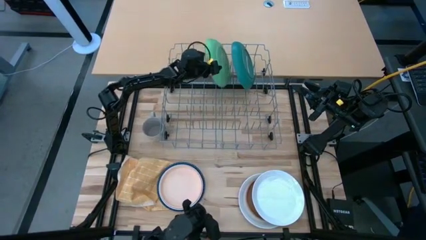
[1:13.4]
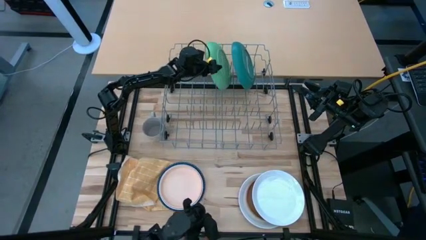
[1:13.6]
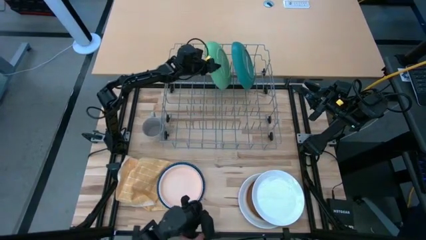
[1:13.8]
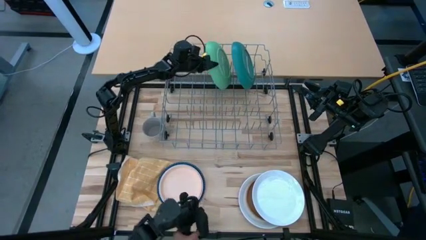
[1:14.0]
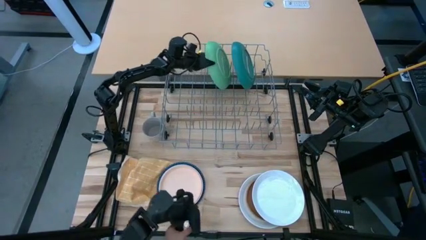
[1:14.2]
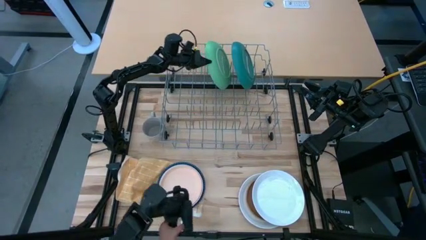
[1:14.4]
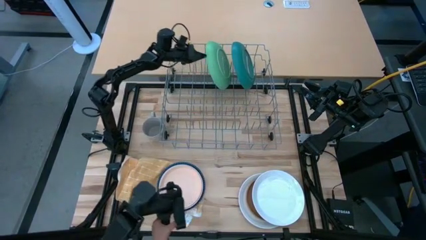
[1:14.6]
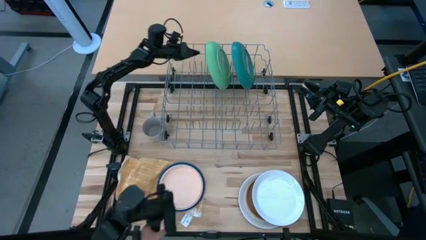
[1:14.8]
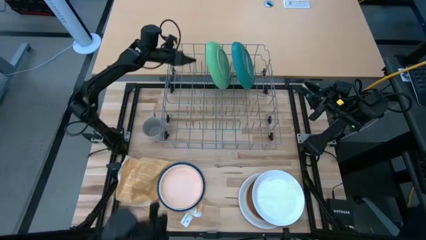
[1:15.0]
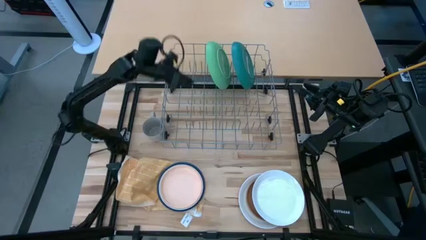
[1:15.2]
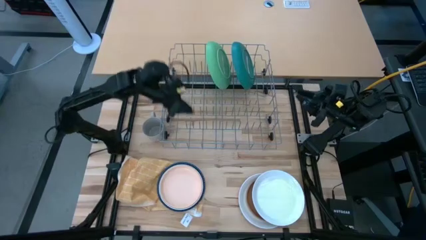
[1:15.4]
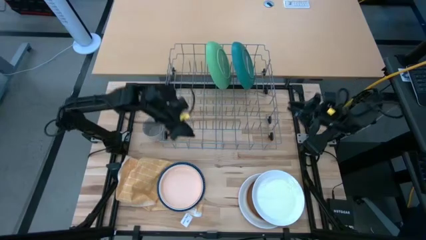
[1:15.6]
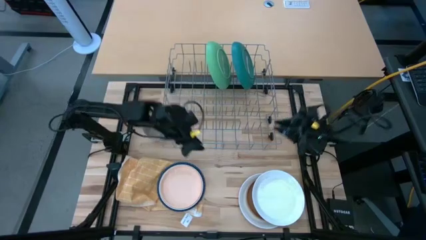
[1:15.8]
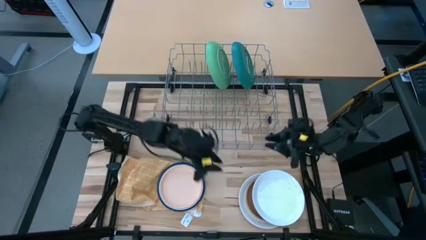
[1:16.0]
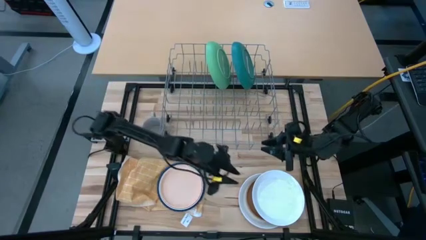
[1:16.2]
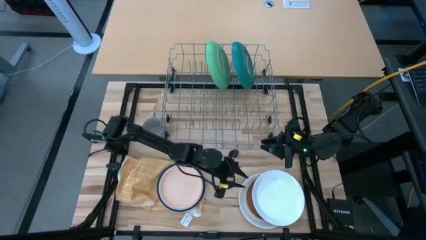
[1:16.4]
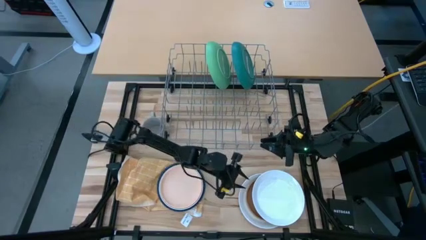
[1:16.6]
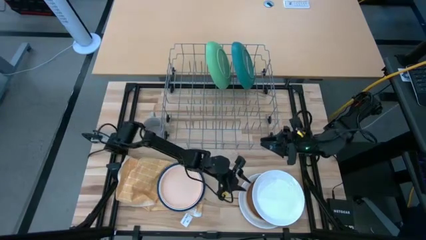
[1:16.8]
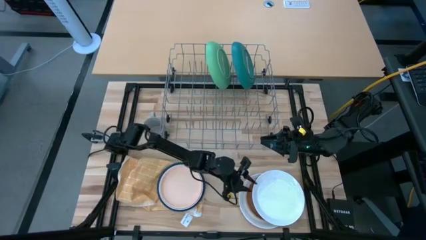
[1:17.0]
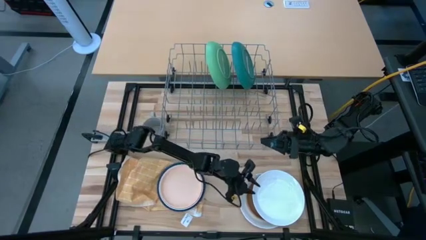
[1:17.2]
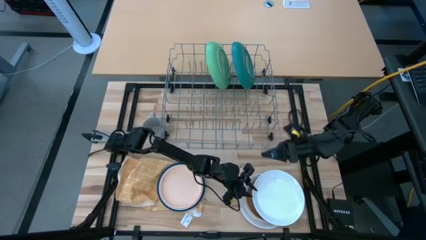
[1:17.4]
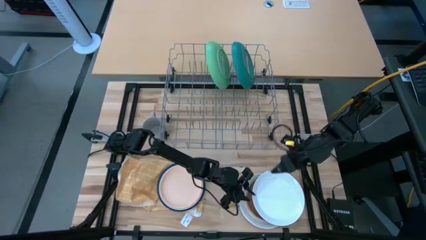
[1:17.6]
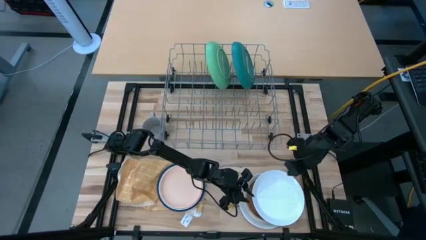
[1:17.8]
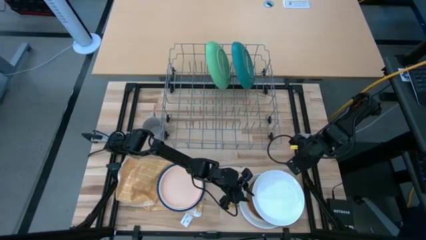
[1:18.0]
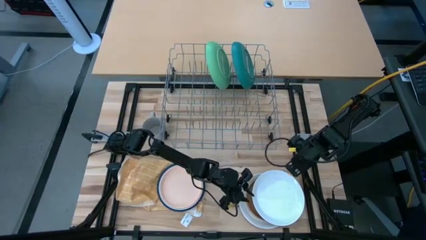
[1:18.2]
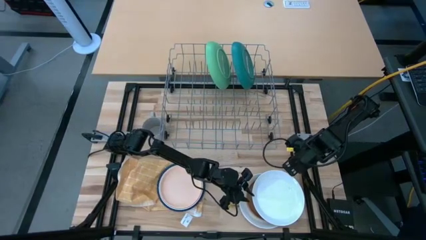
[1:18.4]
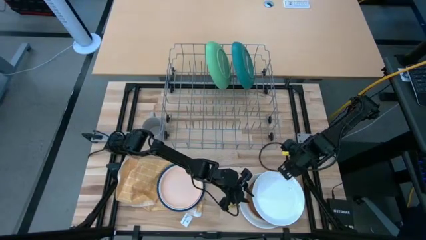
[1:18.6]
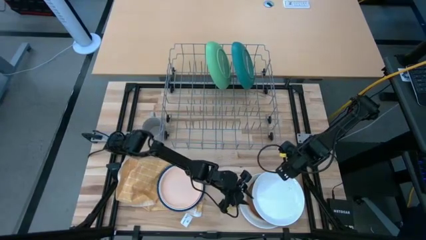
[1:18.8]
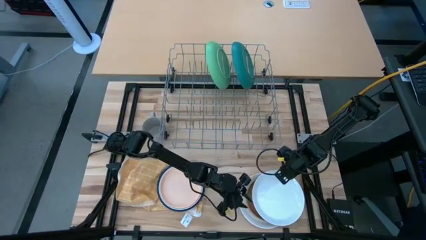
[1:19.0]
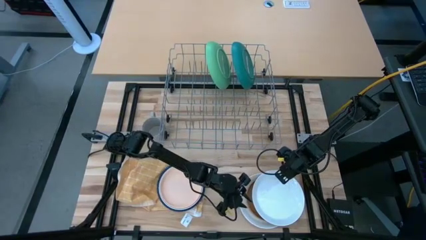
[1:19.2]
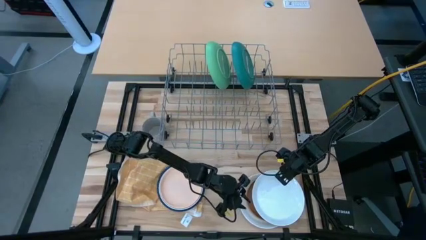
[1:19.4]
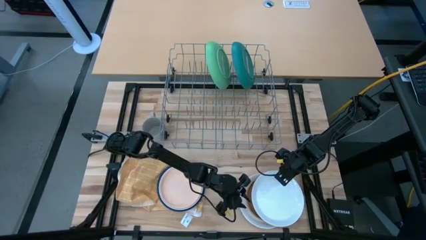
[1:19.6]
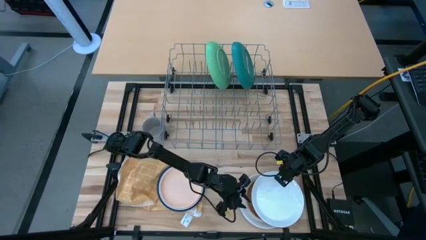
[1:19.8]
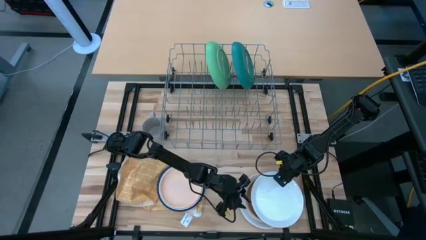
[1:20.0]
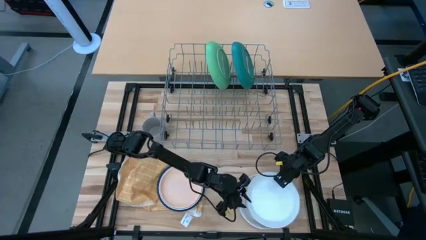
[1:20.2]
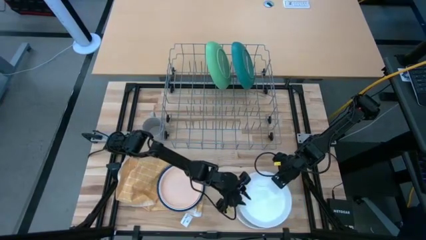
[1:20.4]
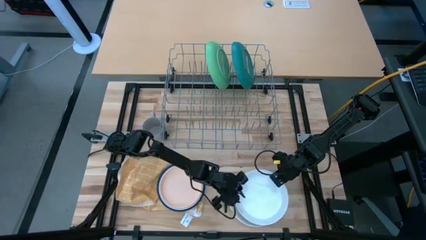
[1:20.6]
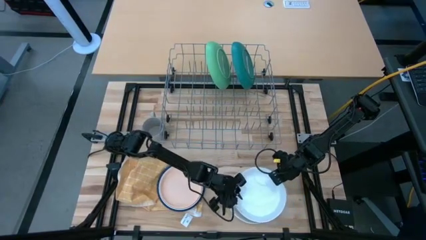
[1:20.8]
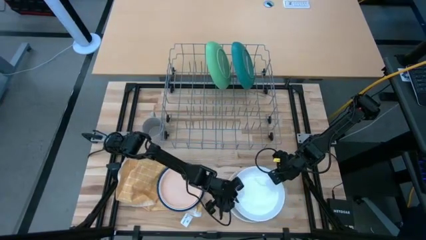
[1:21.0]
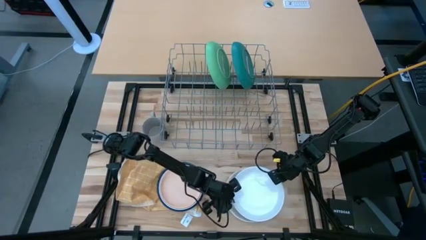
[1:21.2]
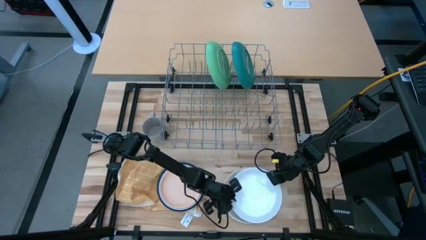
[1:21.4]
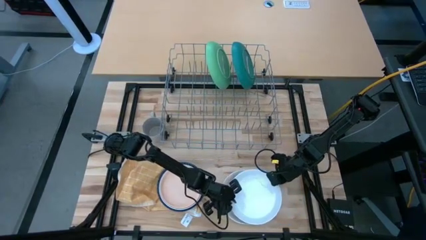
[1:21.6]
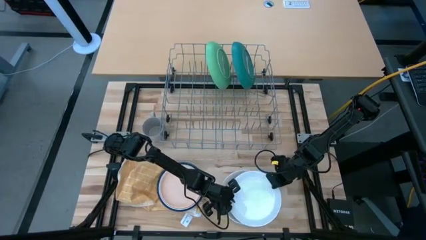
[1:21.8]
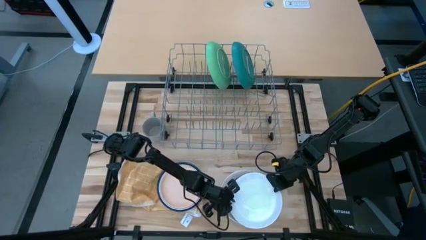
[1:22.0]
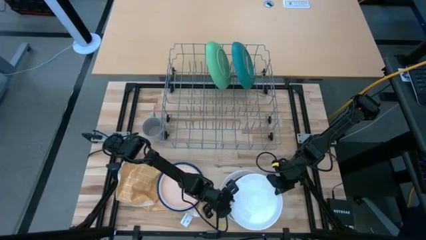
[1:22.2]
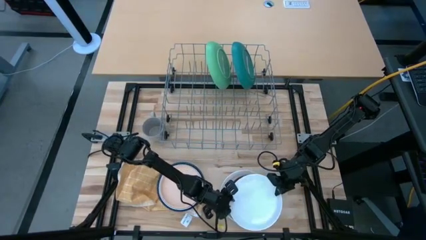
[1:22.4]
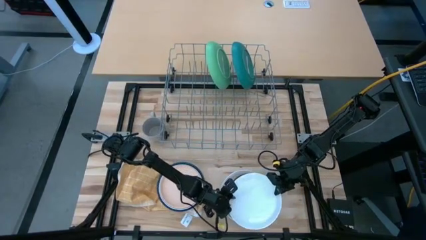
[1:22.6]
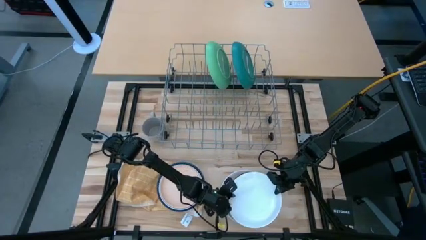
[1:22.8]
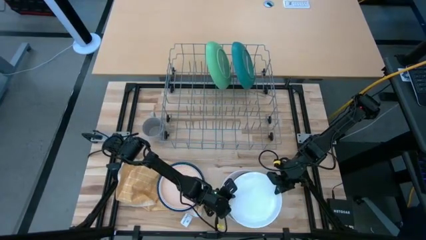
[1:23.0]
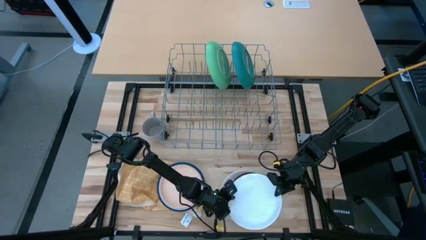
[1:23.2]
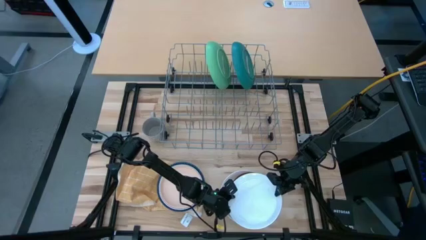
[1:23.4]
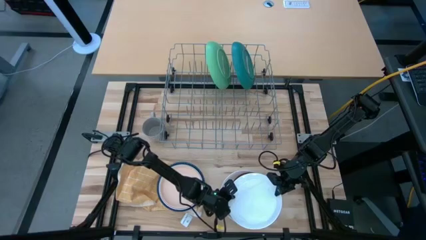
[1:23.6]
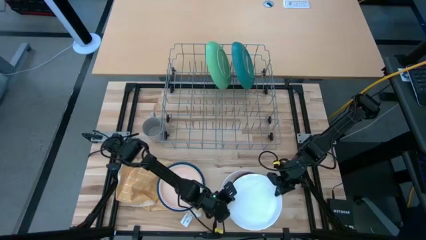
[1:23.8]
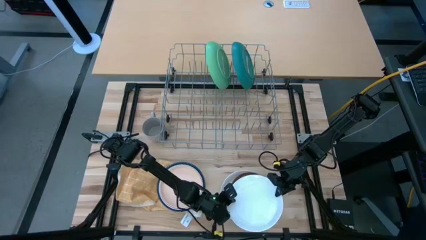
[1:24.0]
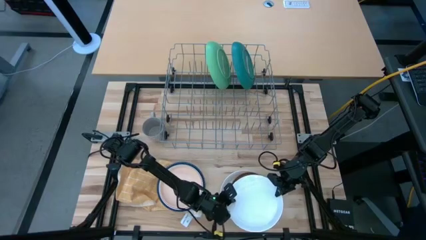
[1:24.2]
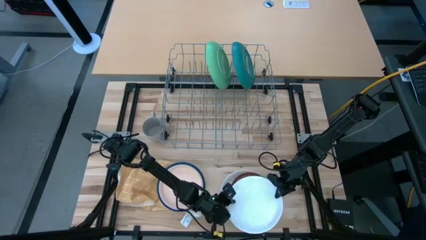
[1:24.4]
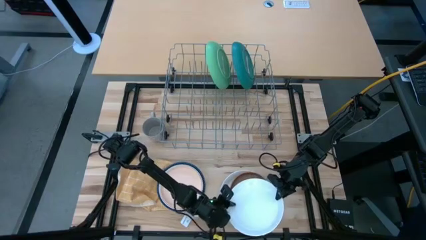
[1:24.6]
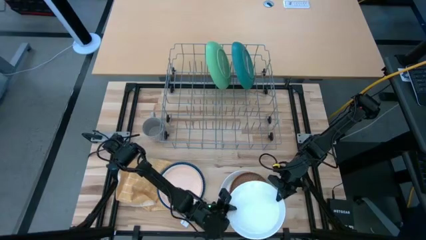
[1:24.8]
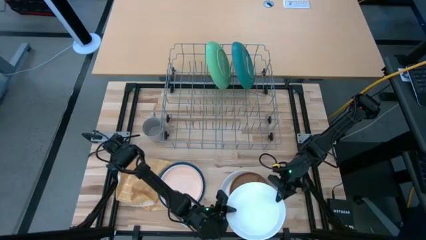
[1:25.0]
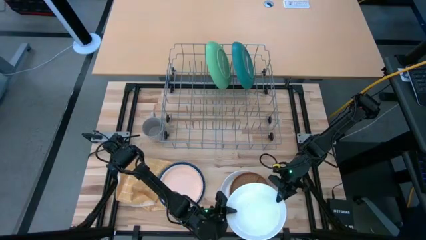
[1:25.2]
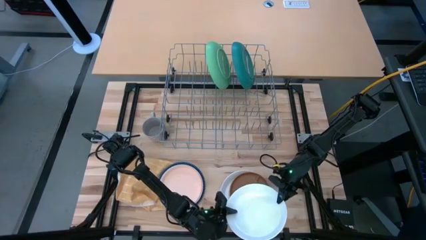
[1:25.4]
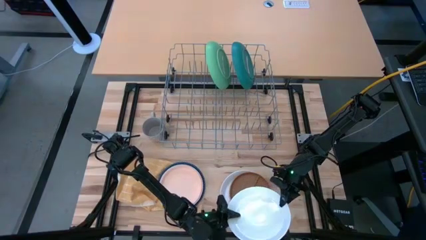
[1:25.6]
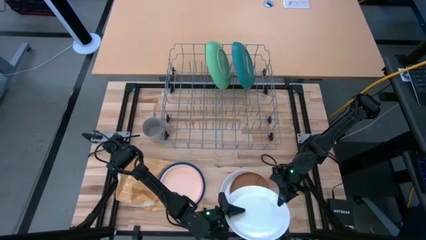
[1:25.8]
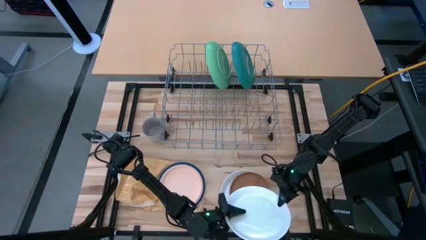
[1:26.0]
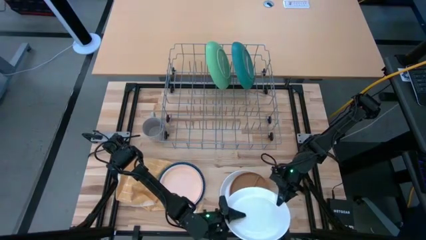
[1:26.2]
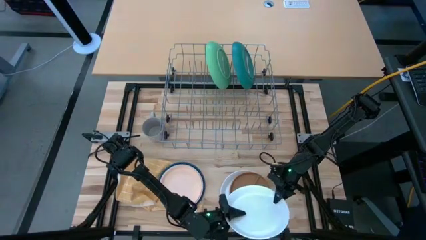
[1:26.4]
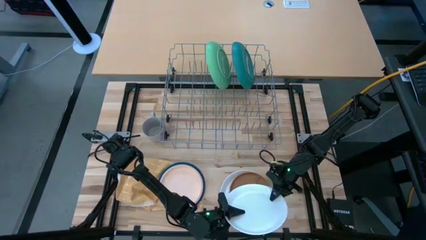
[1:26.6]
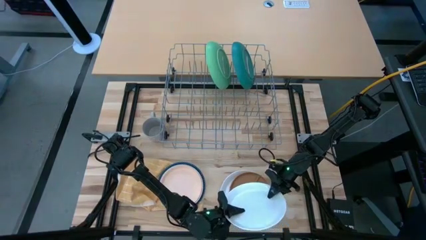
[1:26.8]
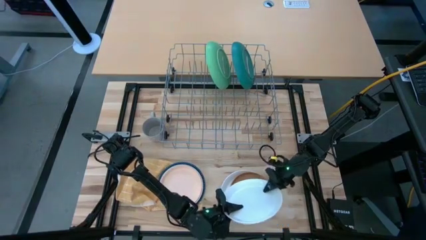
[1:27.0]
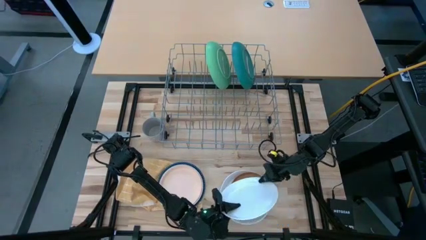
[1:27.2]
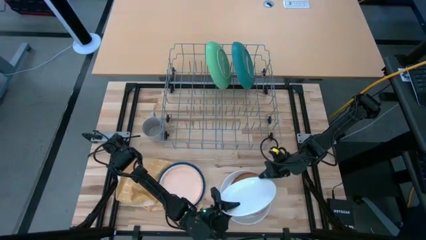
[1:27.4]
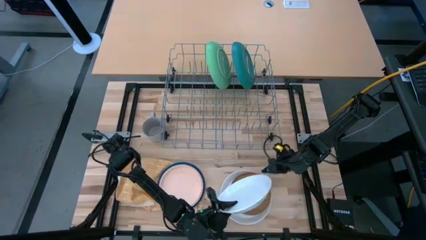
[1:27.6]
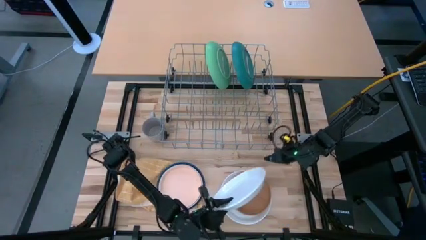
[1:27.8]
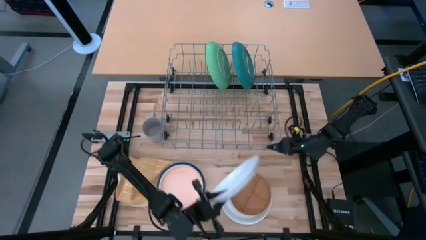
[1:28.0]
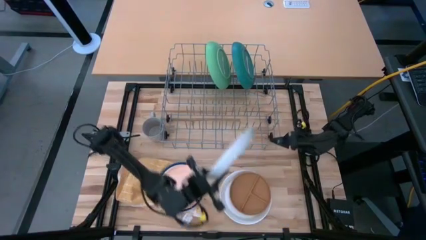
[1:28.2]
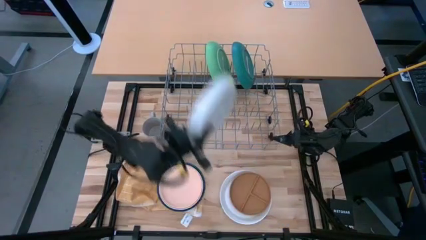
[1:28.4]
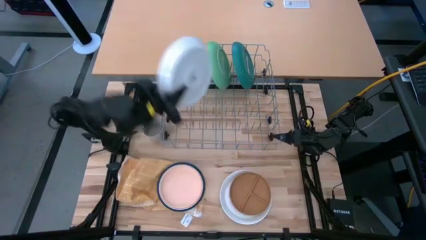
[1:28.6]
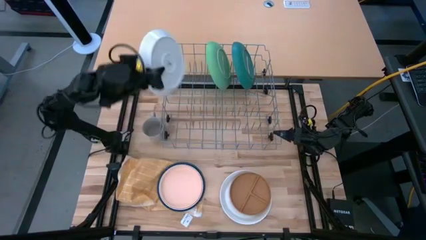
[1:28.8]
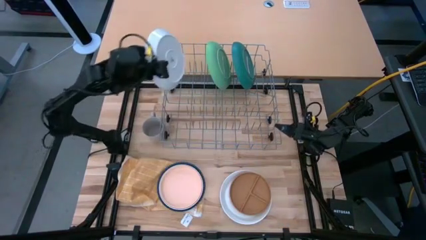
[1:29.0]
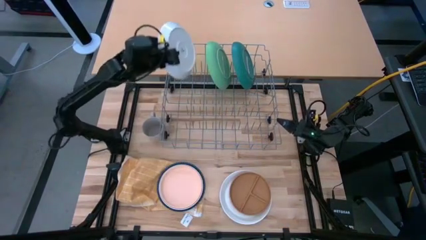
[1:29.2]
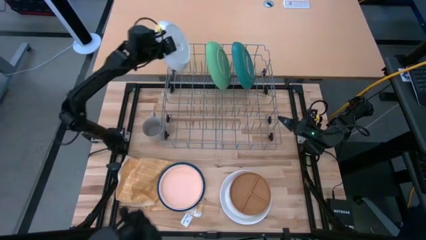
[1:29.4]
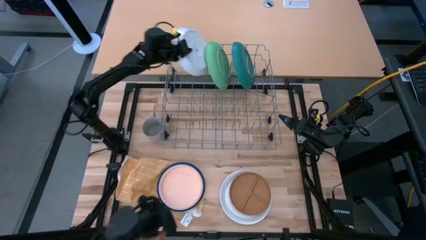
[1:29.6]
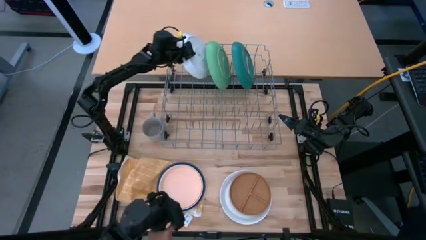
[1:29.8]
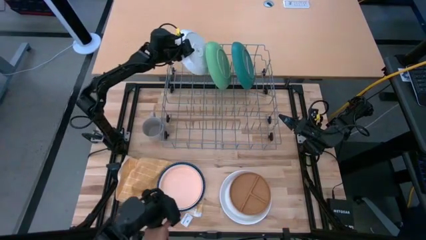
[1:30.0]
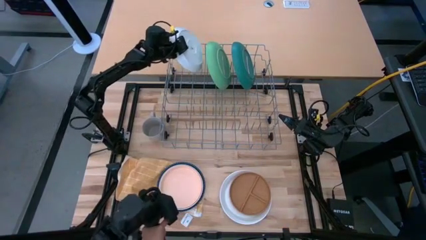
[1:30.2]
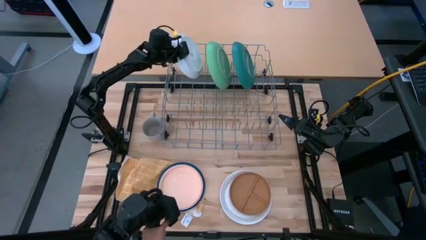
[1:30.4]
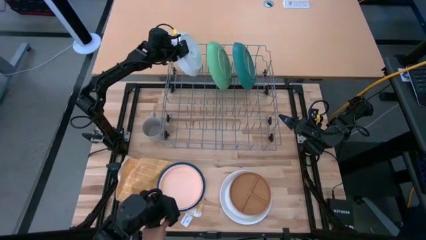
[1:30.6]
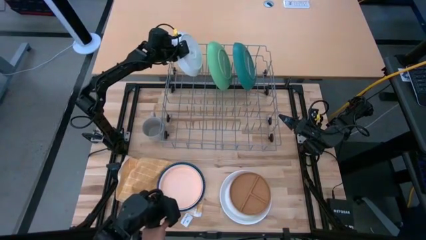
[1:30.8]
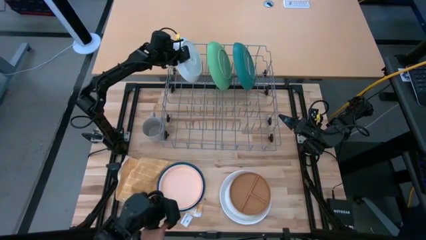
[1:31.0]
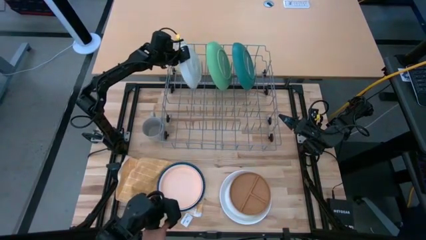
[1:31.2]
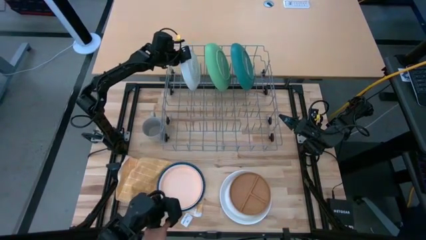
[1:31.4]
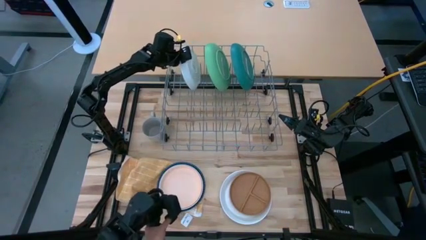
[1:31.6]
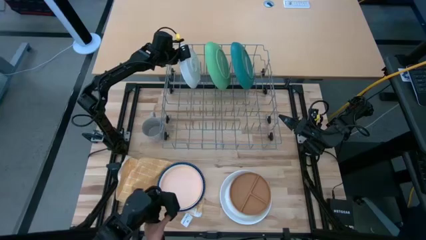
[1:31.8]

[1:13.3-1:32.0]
Task: Sort dishes
Put the white plate in the dish rack
